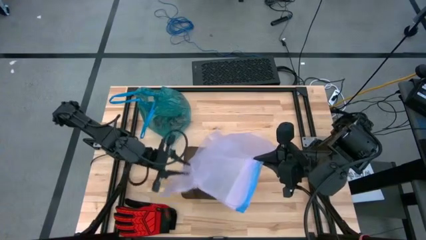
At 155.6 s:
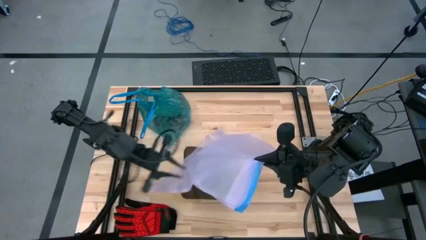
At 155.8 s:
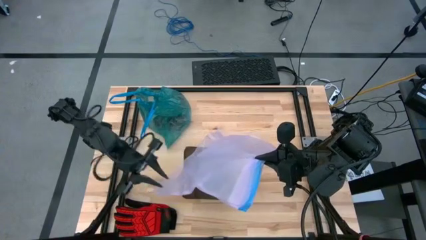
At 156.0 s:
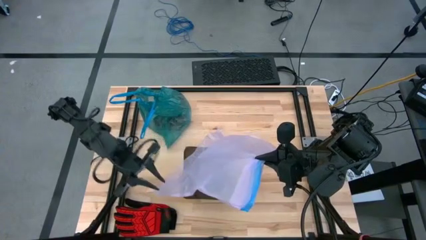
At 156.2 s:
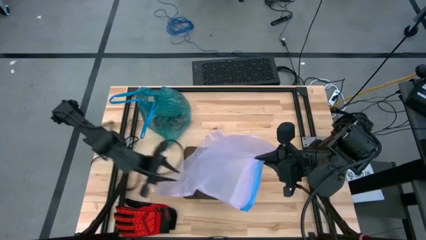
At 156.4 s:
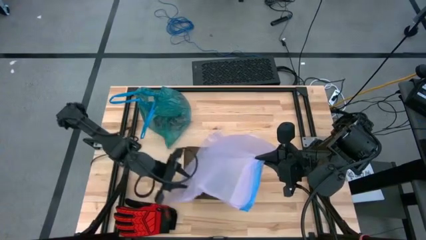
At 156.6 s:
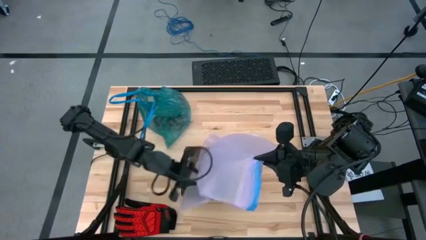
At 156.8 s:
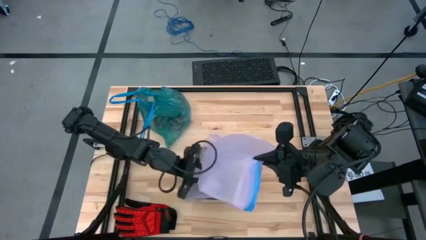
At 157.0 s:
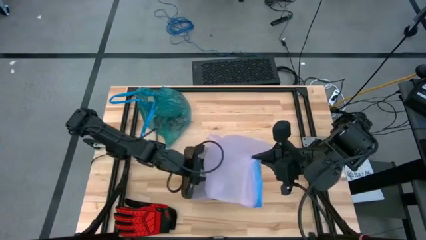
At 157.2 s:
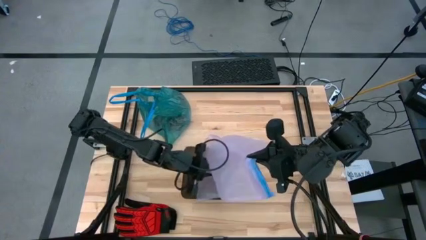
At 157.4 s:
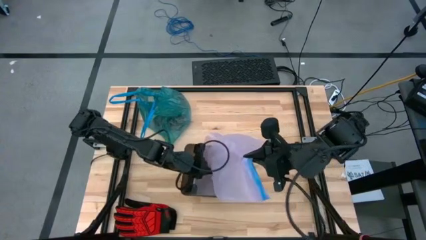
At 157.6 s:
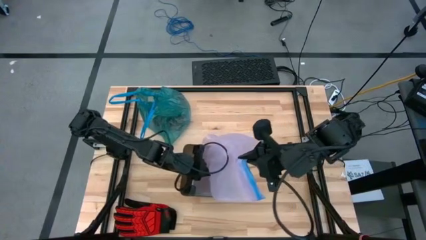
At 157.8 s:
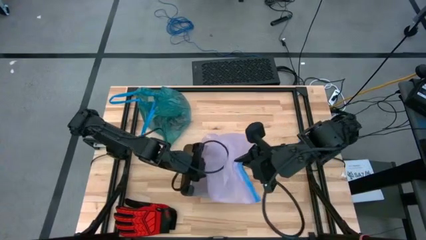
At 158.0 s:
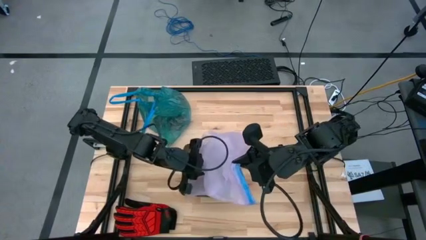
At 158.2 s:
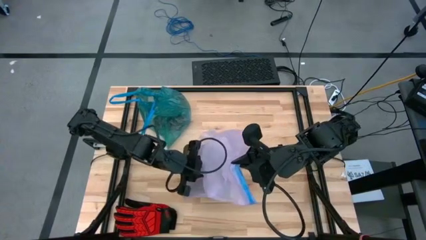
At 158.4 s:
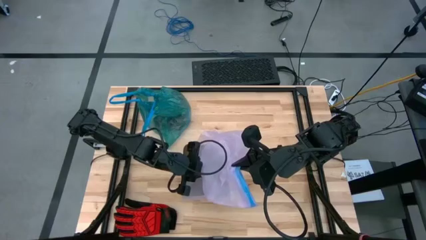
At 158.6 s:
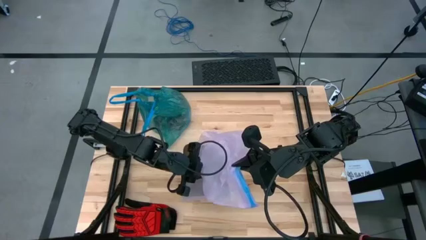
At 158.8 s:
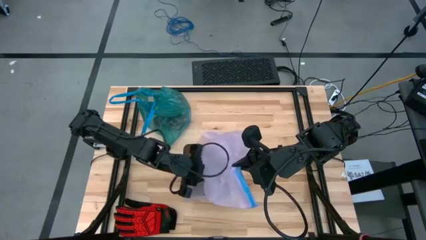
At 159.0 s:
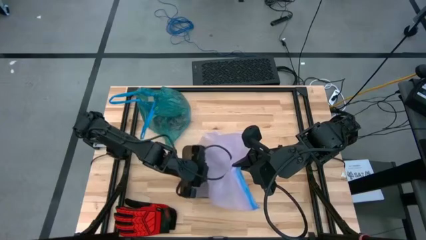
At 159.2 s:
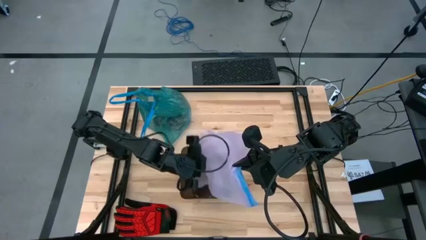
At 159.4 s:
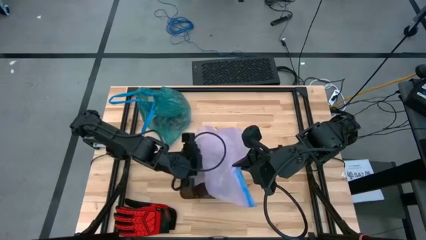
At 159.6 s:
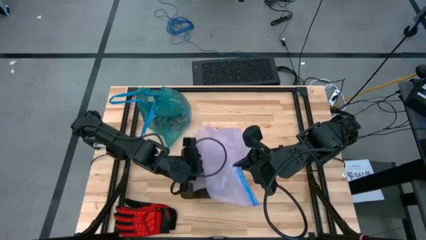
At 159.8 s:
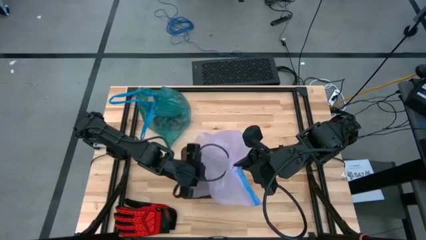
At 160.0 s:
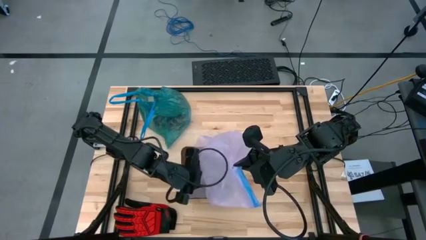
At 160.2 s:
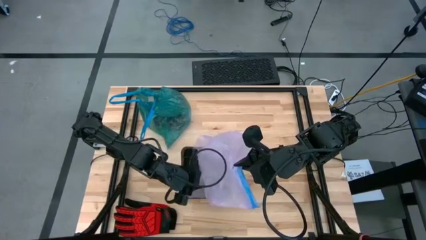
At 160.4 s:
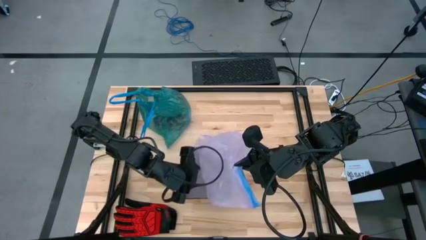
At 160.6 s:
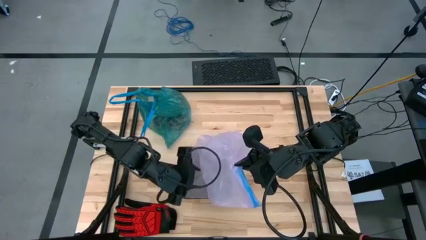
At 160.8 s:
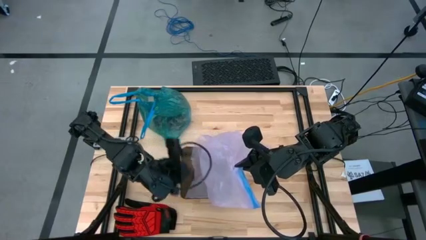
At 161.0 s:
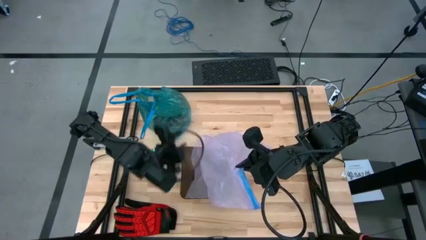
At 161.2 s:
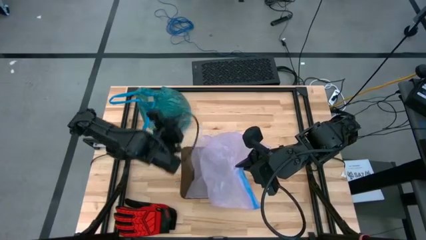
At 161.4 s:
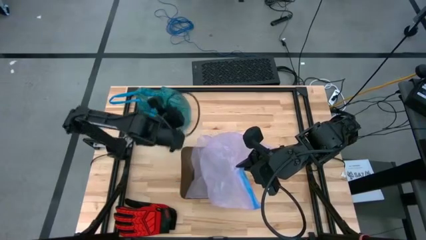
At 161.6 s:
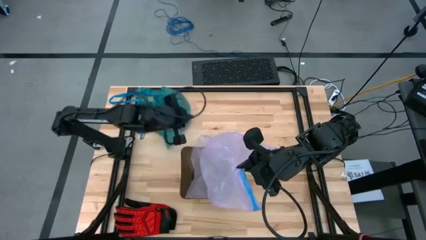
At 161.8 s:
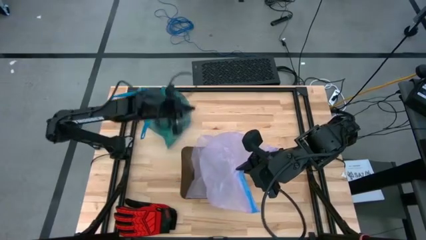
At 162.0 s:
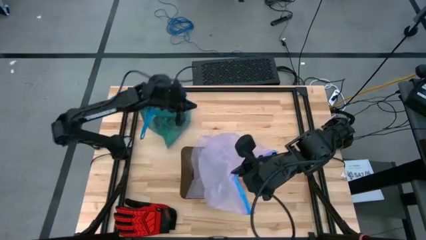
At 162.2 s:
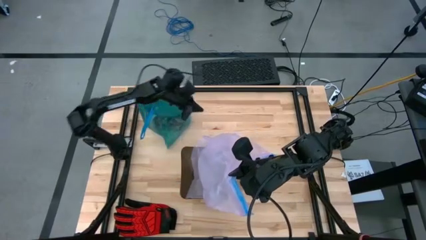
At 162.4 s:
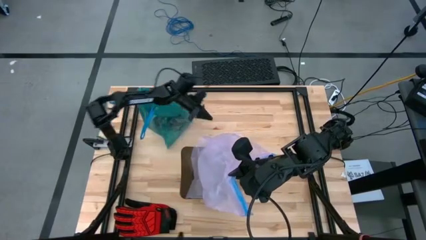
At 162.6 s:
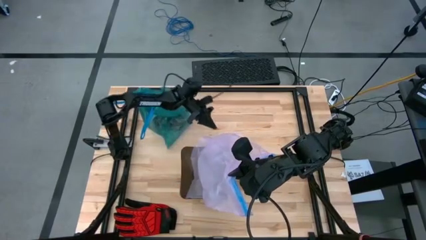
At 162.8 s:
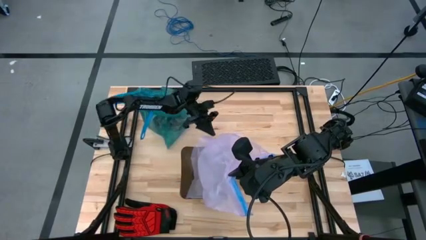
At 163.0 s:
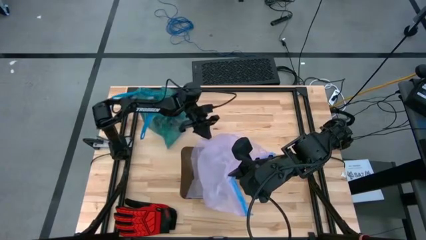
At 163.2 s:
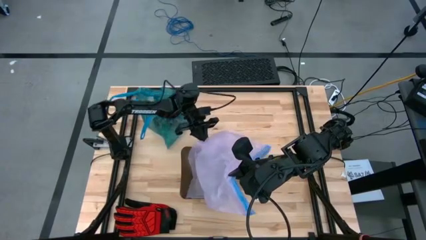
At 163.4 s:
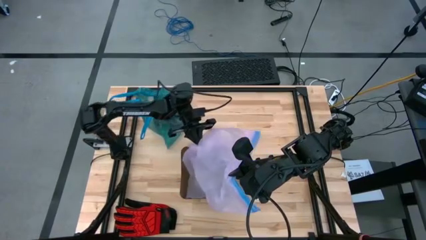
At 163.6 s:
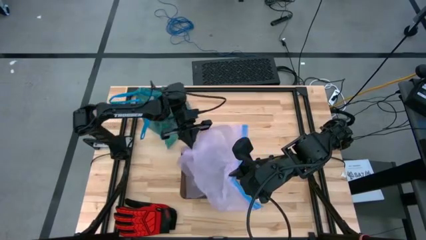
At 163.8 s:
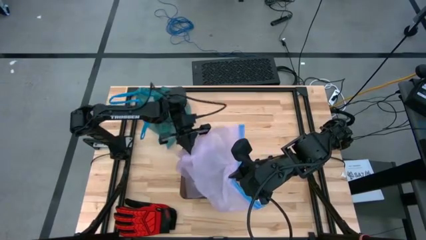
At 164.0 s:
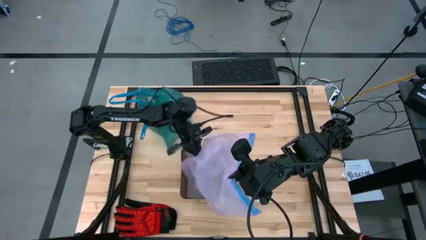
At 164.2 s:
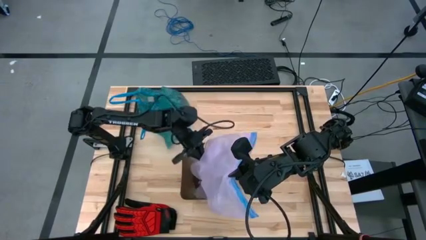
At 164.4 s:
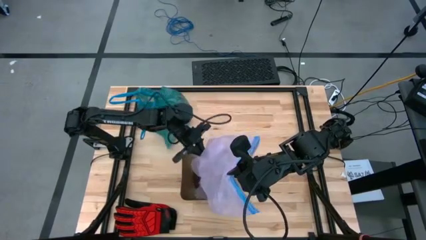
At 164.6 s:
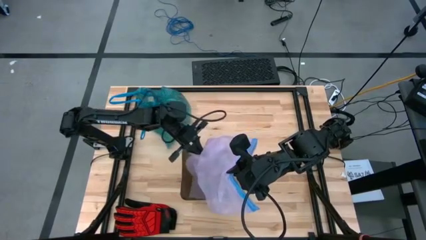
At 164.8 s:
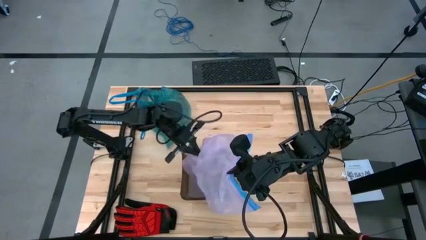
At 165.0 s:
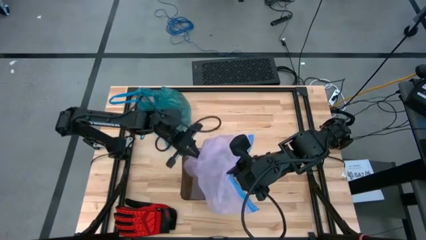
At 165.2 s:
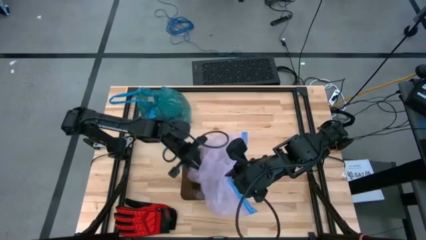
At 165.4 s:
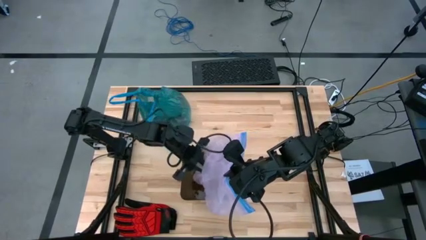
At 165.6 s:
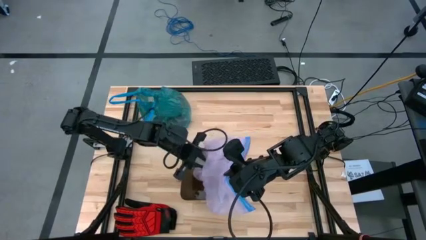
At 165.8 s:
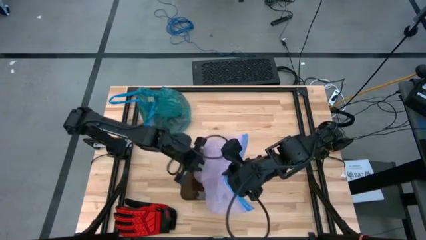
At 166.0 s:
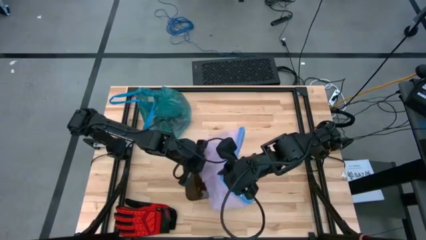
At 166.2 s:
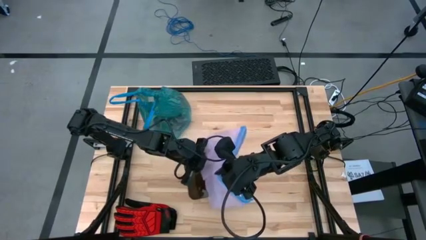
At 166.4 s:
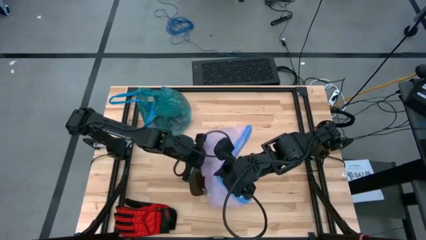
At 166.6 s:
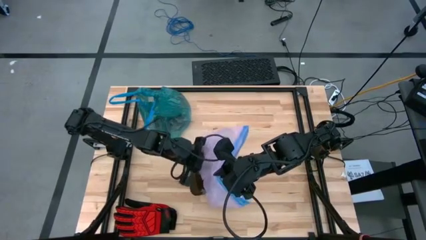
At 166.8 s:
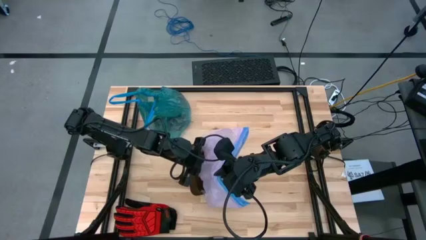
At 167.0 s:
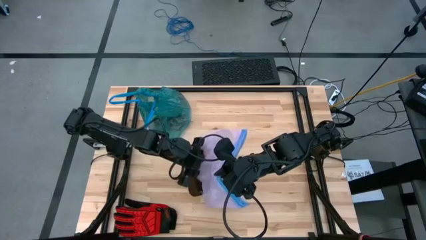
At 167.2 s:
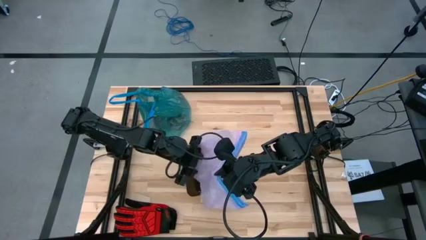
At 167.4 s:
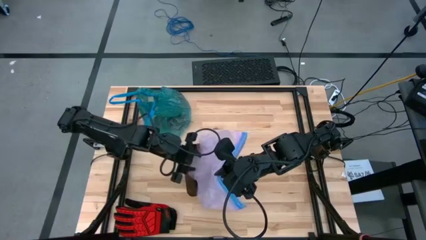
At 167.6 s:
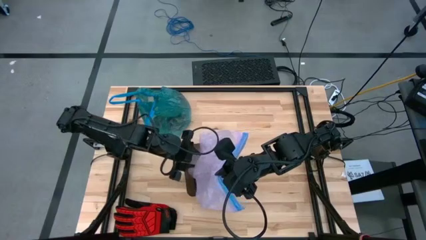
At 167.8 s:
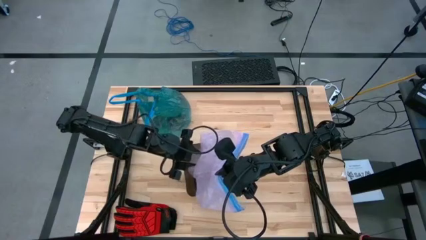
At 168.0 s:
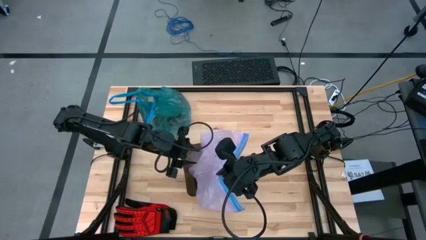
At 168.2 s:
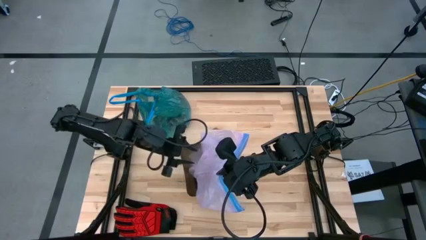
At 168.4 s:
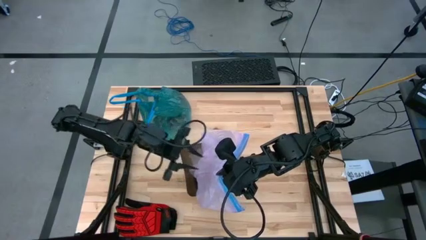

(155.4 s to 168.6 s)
Task: place trash/remove bag and relplace
Insert the trash bag into the trash bin

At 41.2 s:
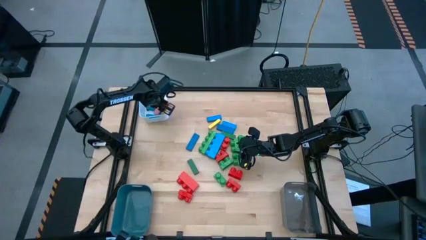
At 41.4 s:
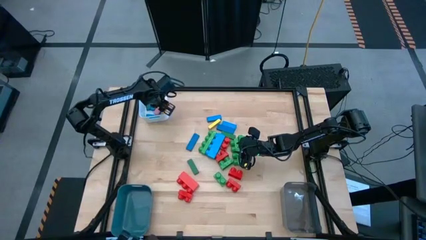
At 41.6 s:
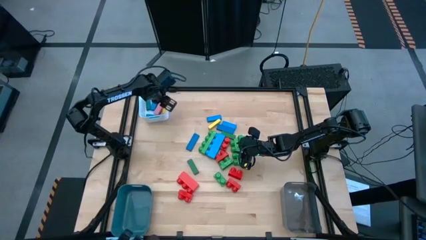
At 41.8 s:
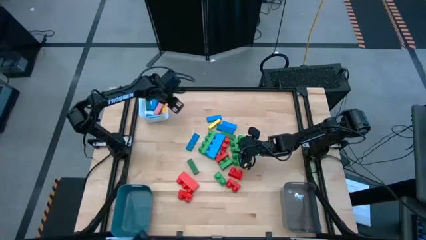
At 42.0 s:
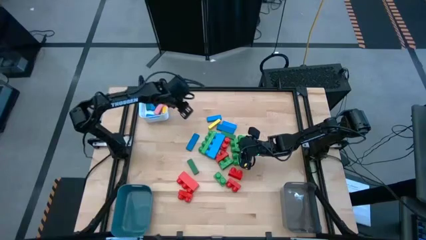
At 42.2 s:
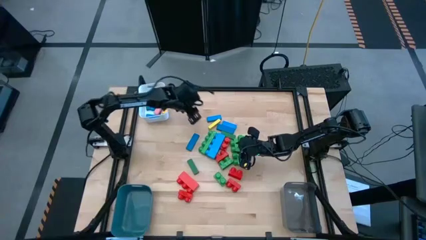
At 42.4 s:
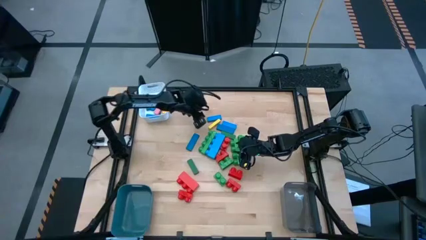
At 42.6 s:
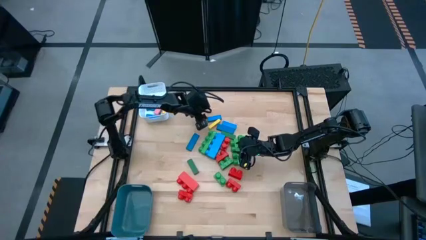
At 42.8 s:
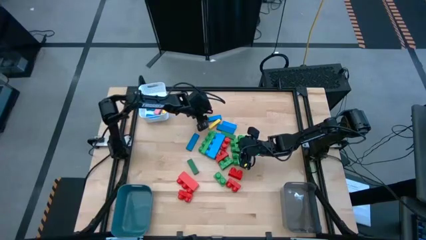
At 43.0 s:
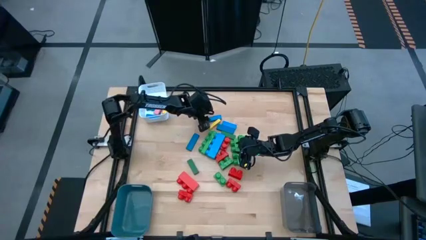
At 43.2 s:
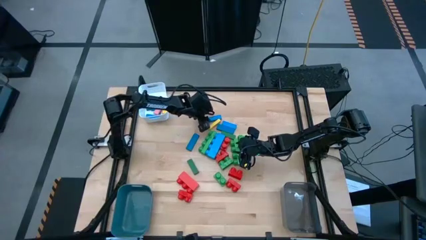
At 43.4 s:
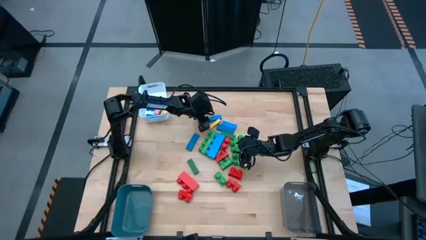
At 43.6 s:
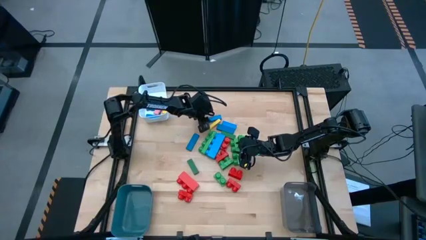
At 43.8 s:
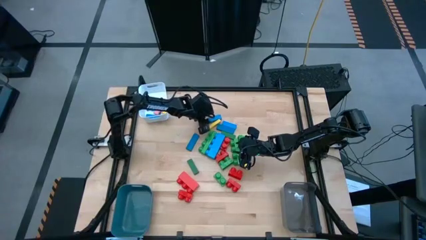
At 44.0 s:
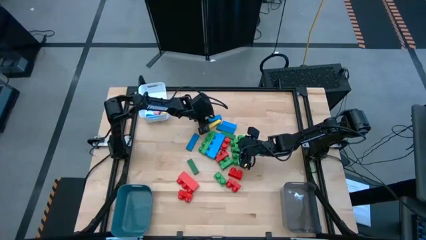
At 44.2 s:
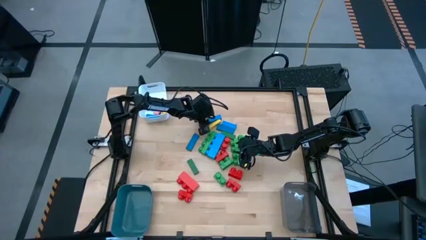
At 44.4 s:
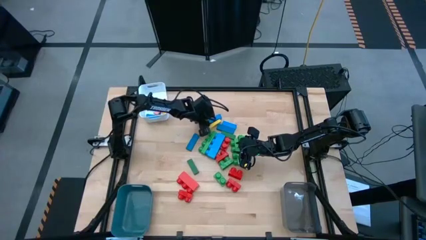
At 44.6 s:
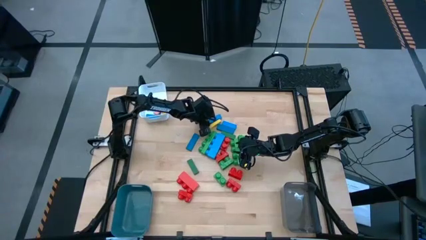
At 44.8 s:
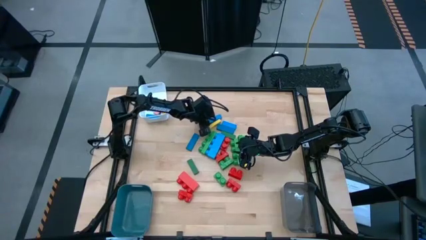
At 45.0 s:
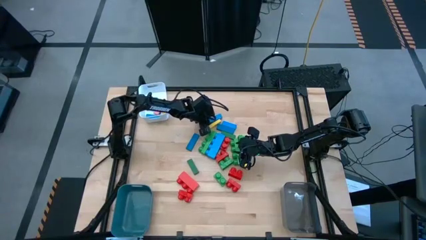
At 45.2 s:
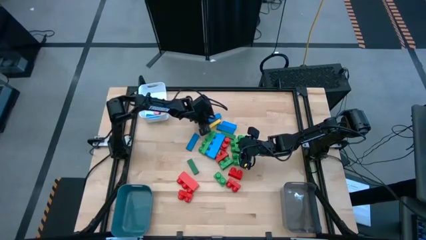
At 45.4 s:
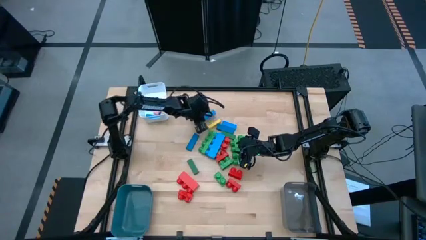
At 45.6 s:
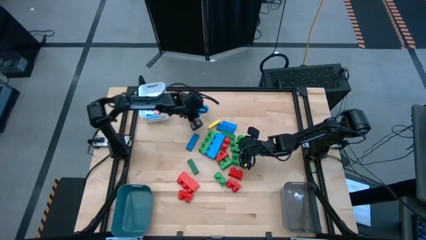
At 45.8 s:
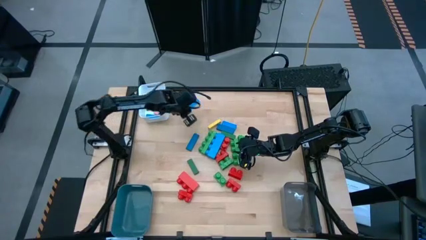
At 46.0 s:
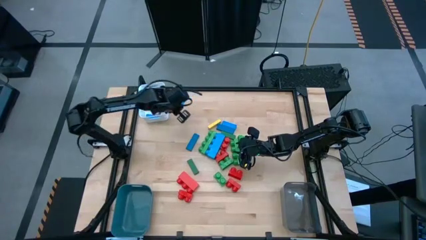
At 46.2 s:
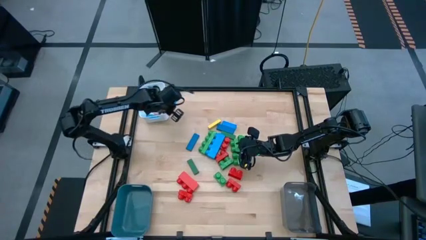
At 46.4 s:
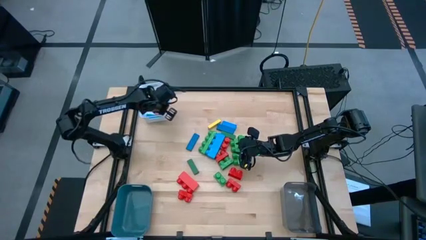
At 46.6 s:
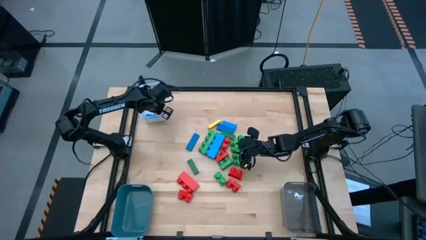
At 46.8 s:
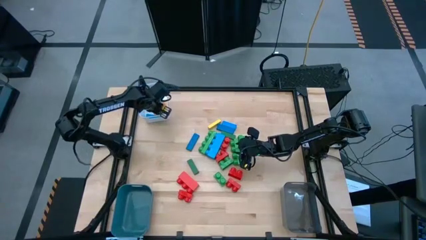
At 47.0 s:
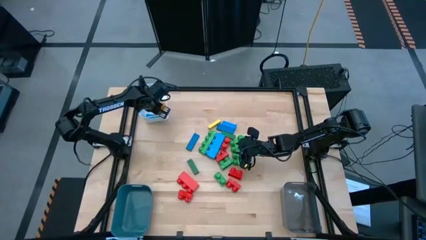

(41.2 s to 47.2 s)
Task: Sort blocks by size
Put the blue block into the white bin
